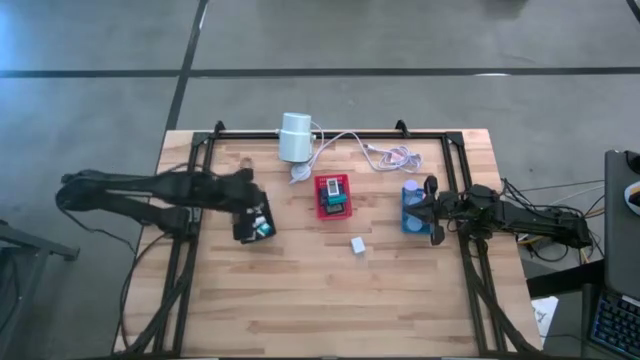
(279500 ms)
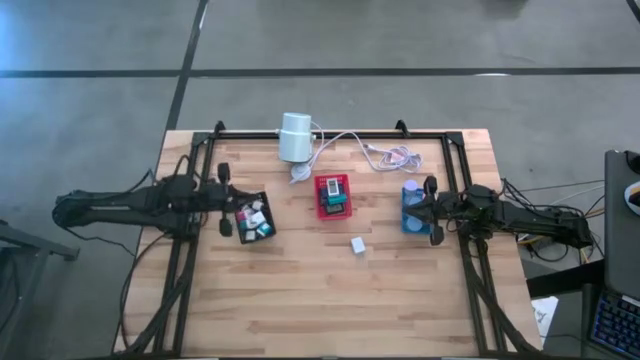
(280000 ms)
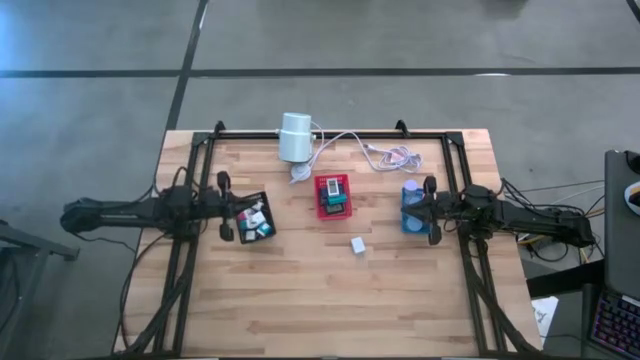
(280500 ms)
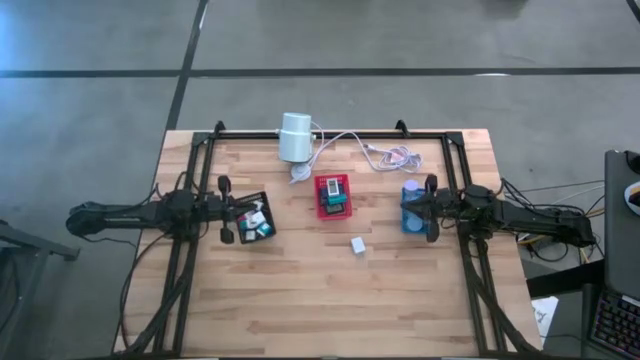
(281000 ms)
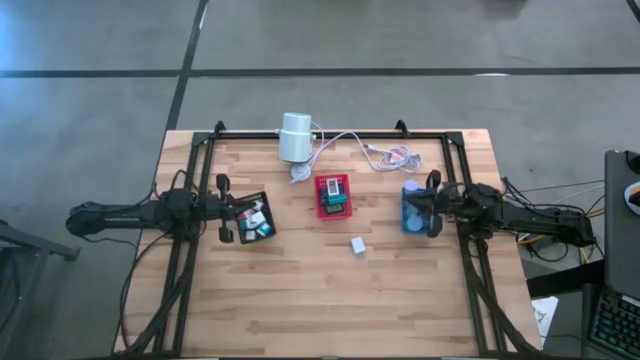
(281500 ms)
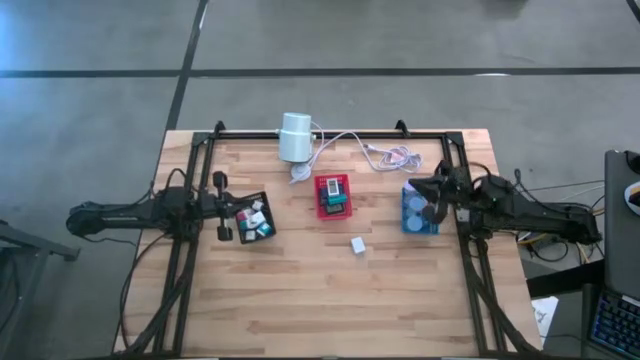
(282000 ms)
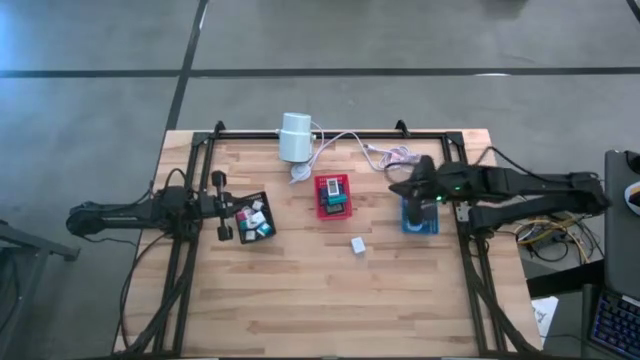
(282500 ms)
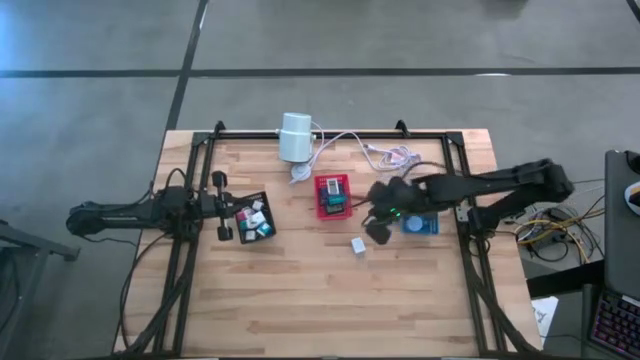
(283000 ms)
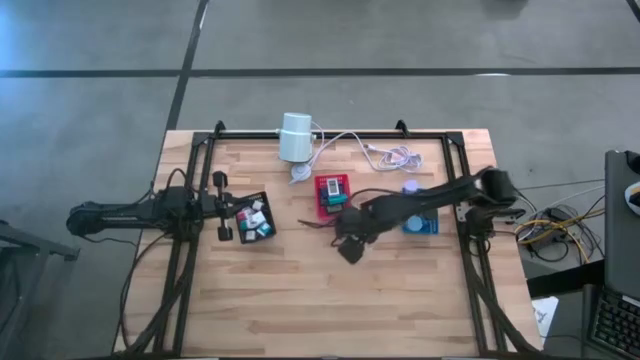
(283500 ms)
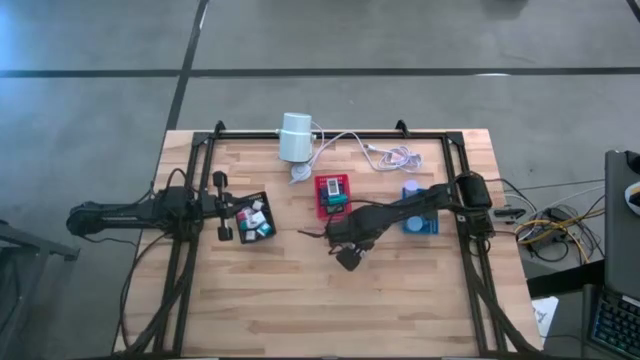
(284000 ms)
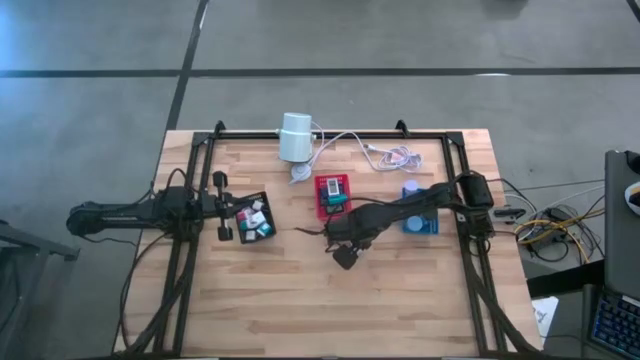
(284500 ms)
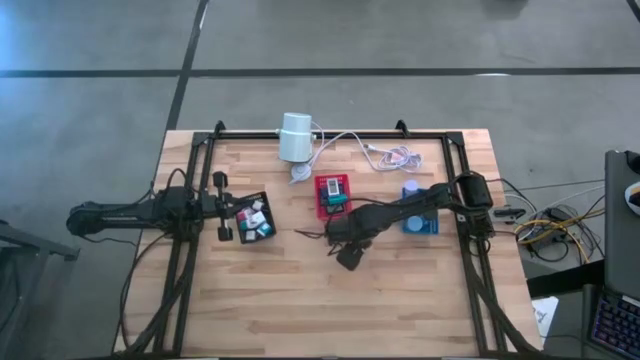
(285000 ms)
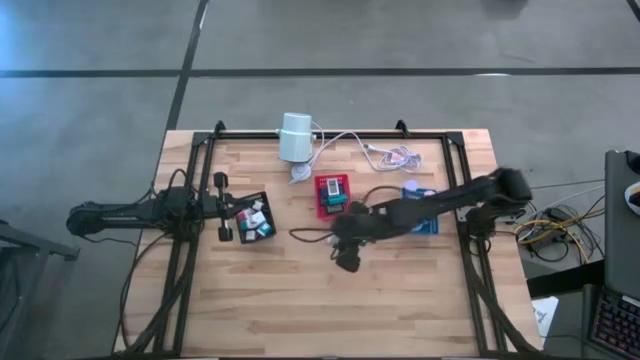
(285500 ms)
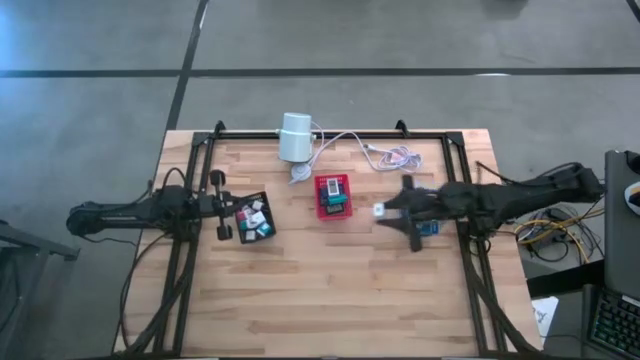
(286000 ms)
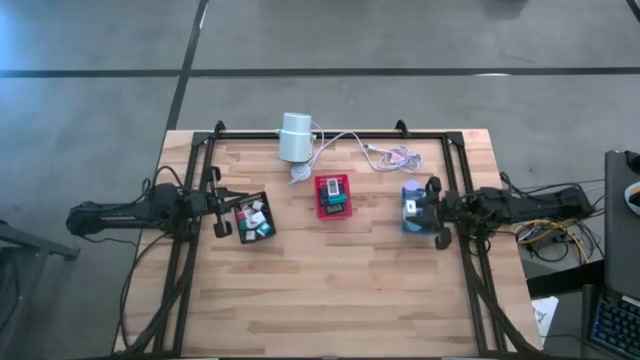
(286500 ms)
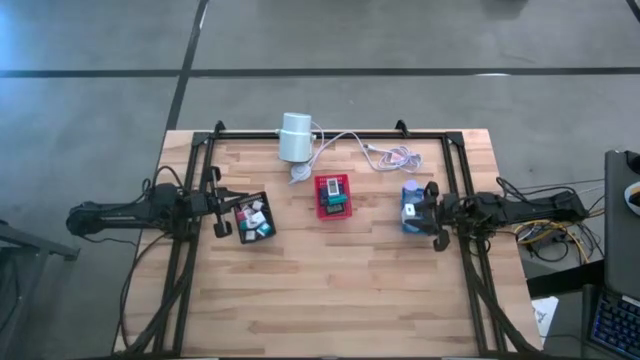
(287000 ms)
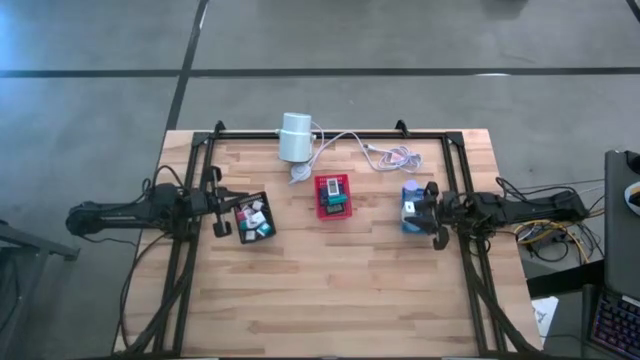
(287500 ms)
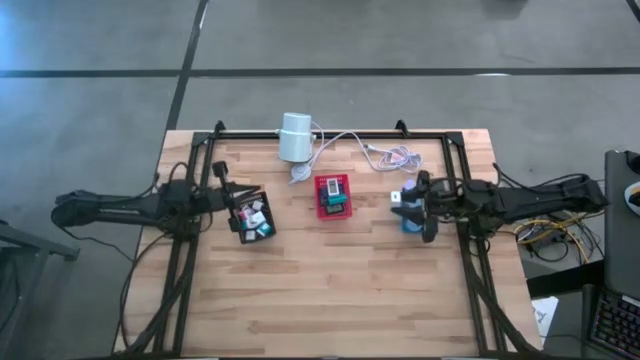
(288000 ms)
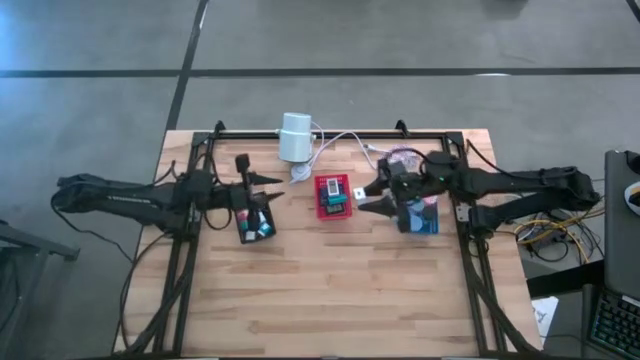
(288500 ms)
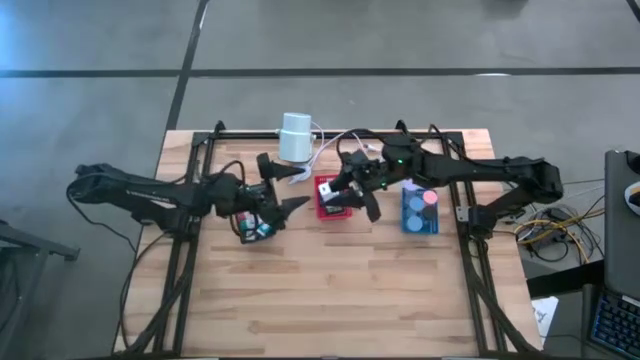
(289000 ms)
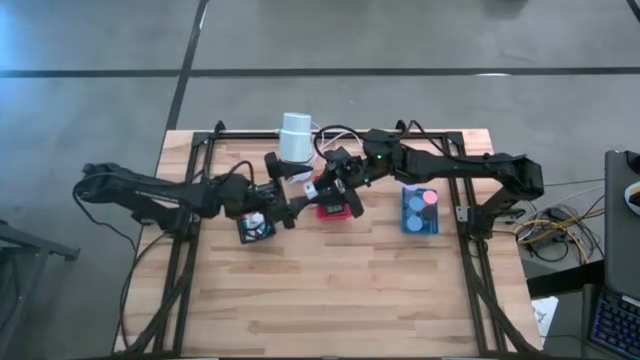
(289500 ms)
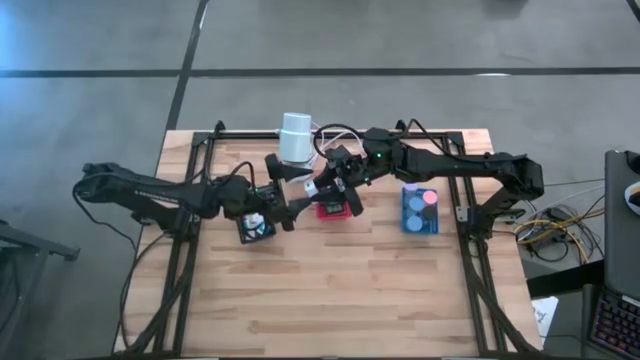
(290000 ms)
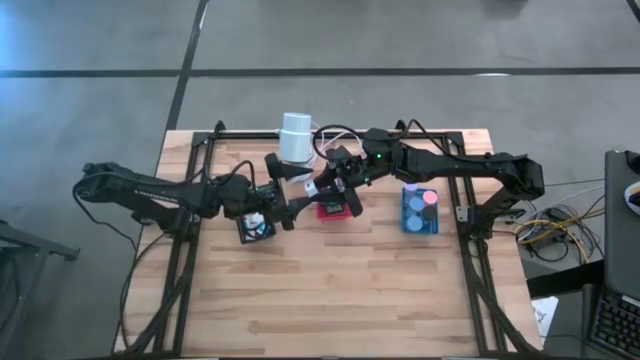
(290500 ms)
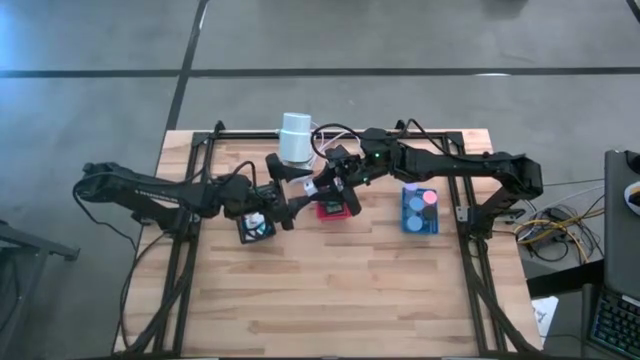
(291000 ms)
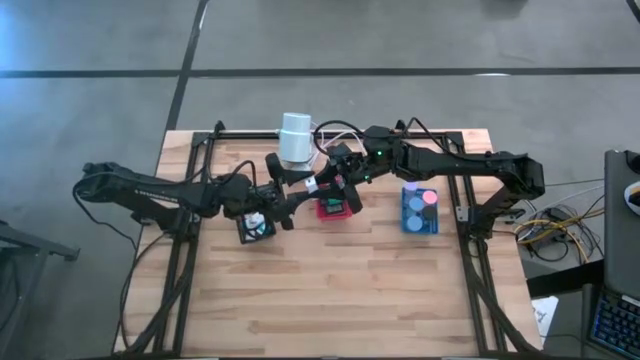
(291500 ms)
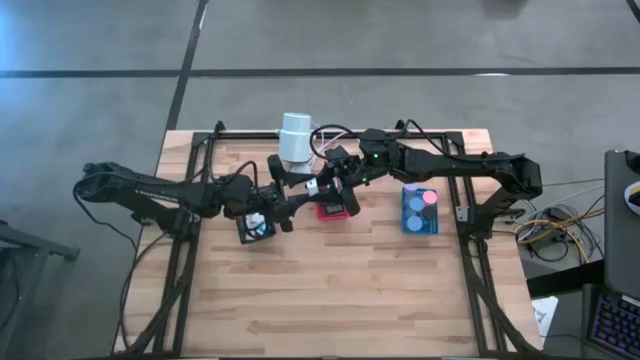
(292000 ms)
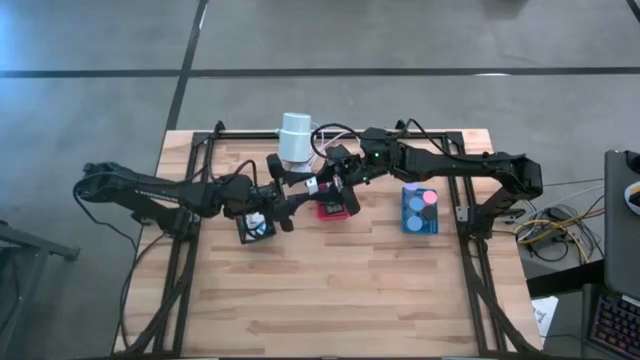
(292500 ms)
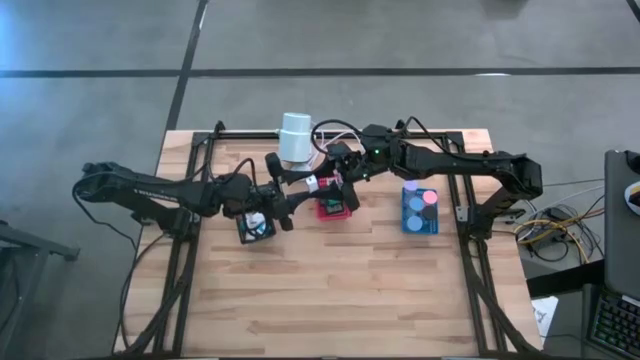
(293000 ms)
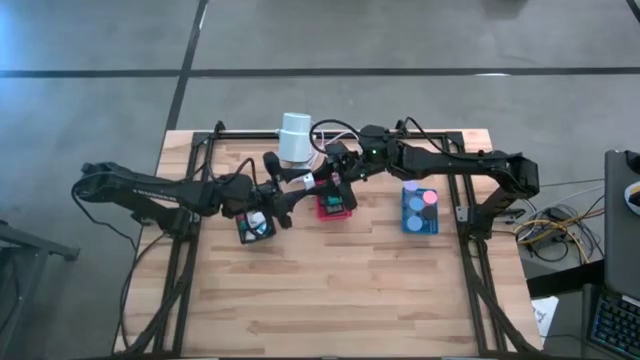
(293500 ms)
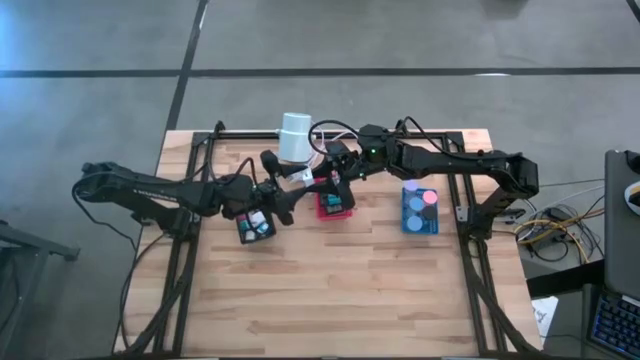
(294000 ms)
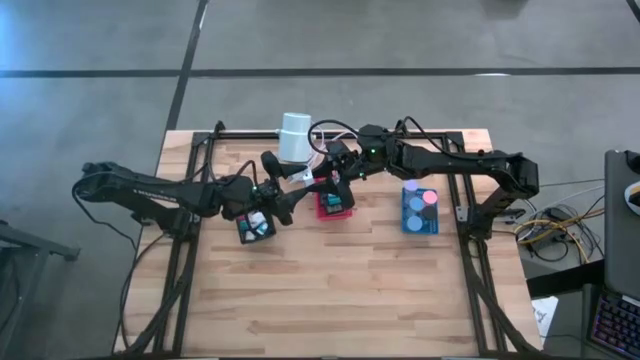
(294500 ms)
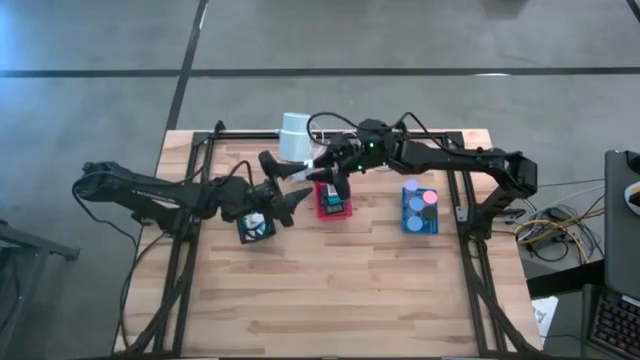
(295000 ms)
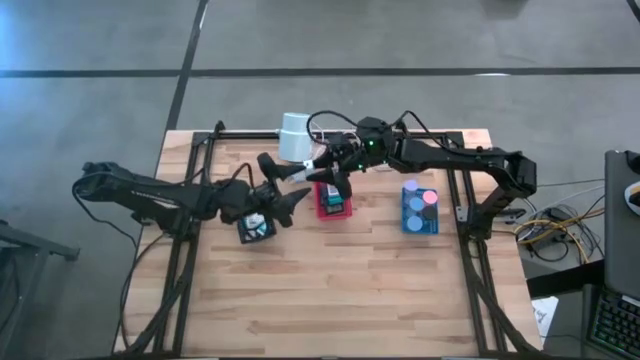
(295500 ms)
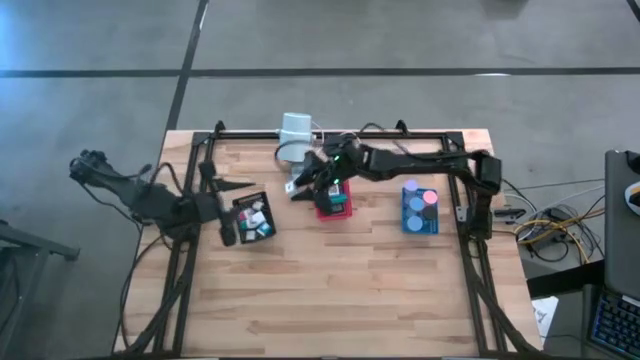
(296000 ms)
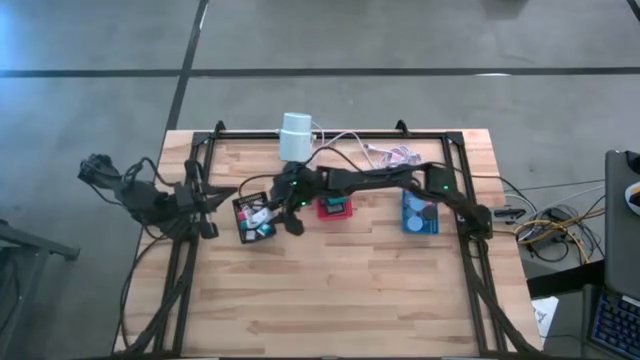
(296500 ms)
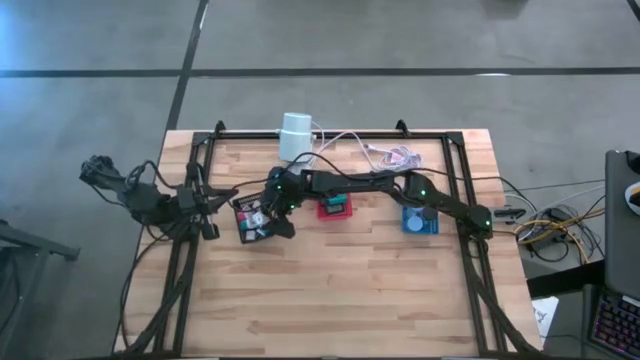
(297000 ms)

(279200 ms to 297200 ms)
Task: Pick & Place Office items
Put the white charger adapter into the black basket
